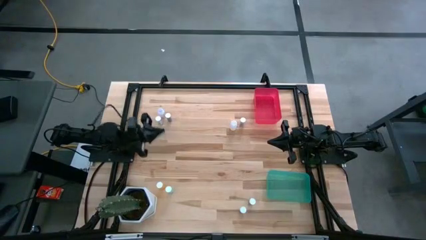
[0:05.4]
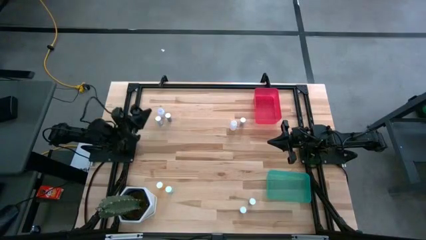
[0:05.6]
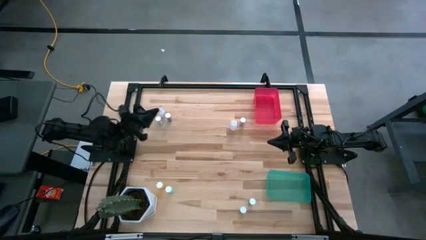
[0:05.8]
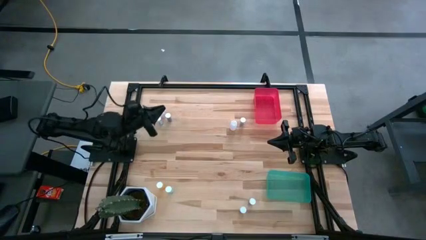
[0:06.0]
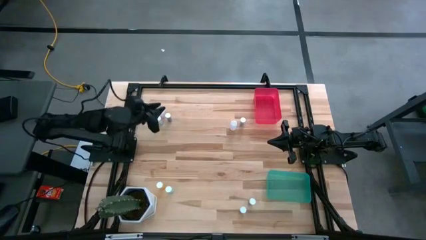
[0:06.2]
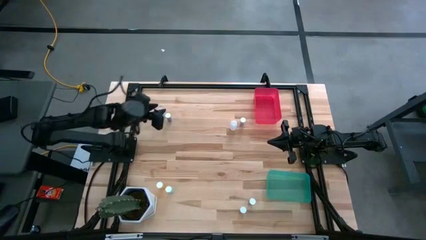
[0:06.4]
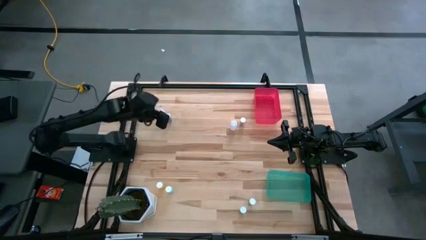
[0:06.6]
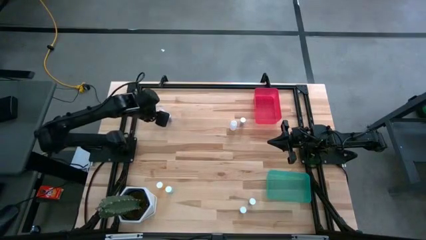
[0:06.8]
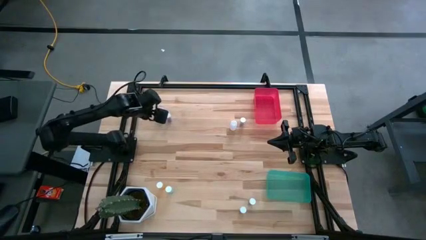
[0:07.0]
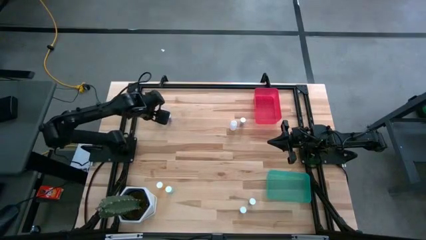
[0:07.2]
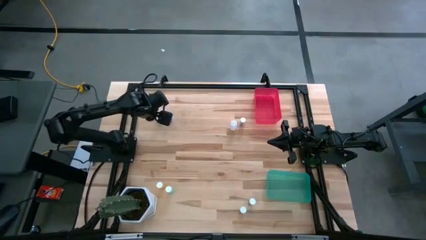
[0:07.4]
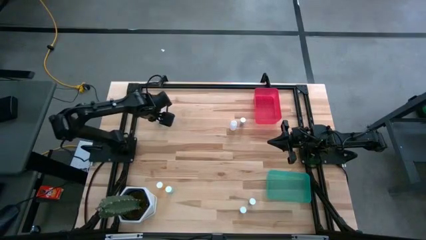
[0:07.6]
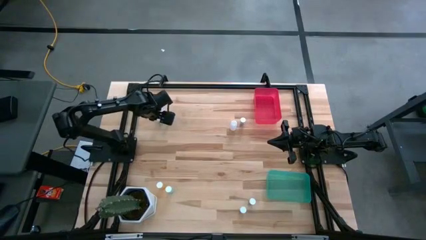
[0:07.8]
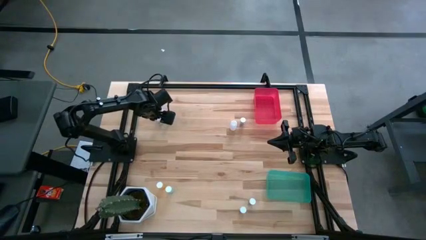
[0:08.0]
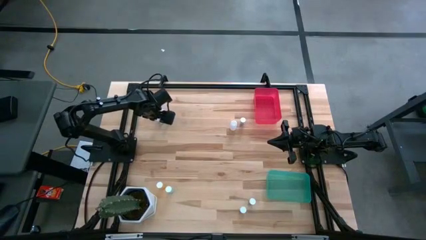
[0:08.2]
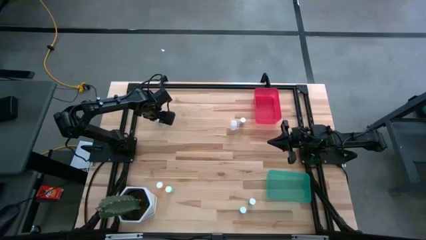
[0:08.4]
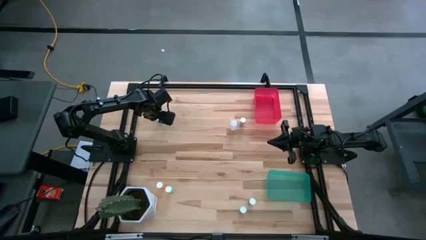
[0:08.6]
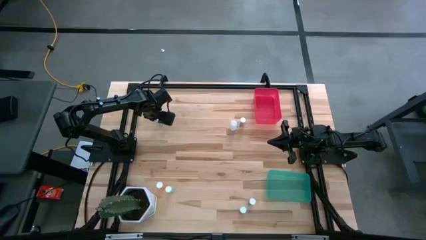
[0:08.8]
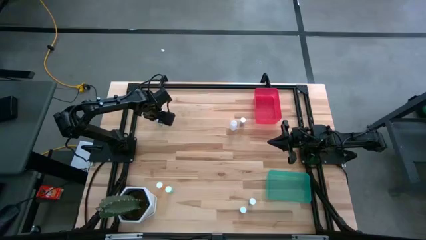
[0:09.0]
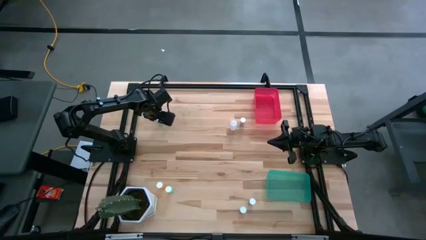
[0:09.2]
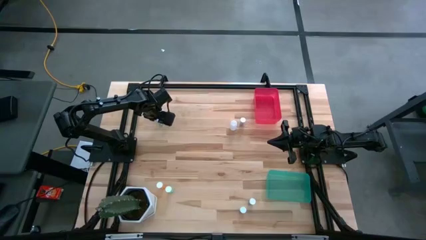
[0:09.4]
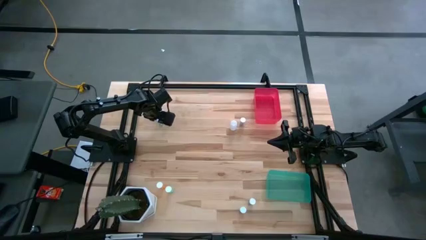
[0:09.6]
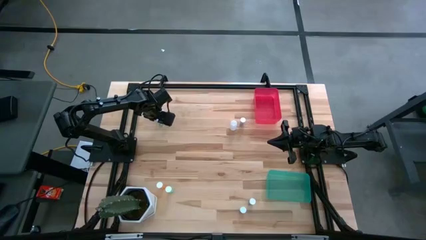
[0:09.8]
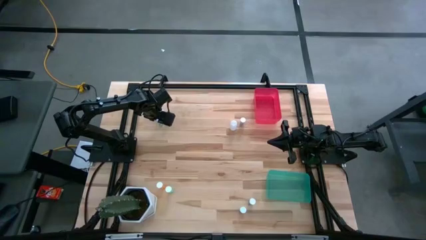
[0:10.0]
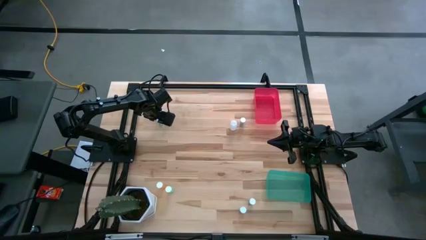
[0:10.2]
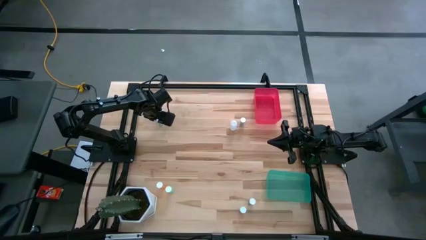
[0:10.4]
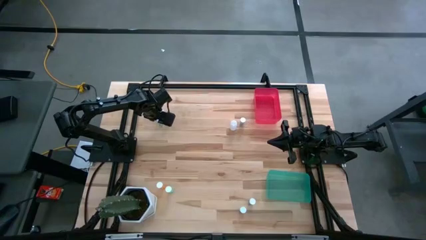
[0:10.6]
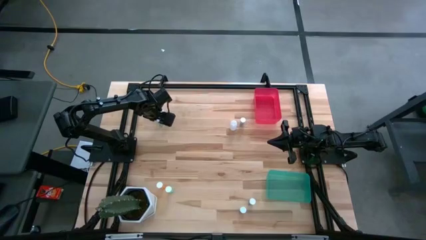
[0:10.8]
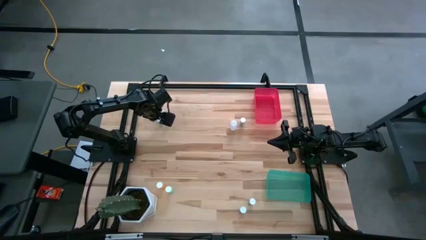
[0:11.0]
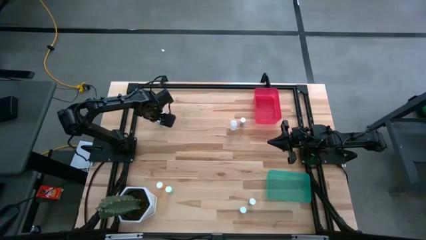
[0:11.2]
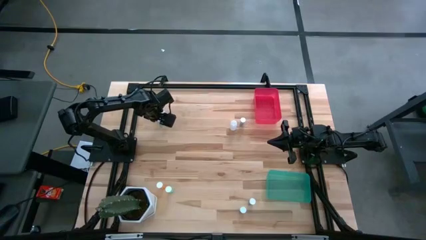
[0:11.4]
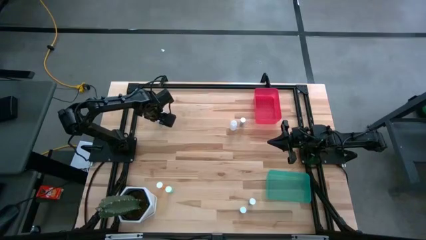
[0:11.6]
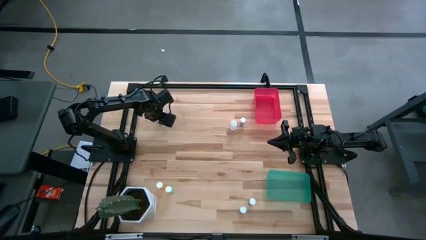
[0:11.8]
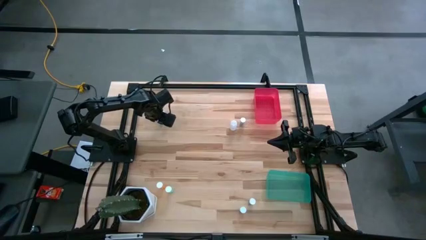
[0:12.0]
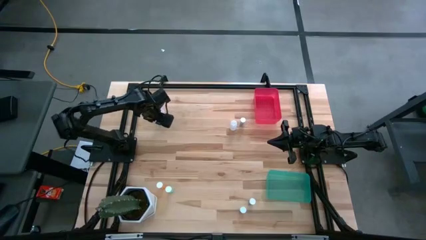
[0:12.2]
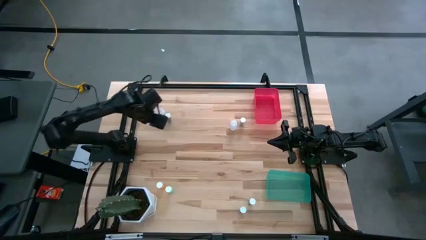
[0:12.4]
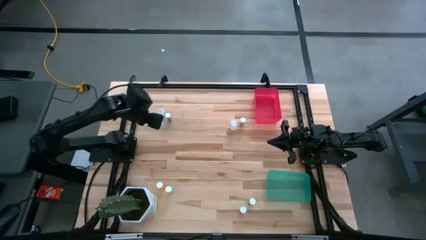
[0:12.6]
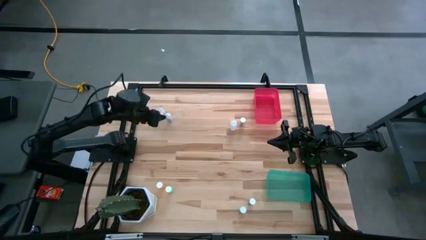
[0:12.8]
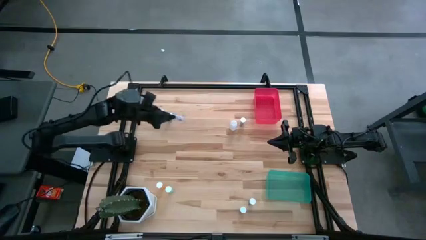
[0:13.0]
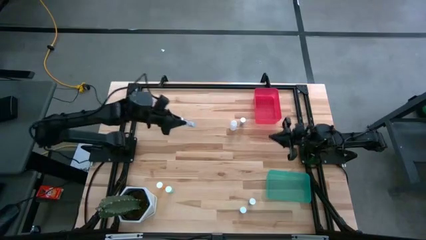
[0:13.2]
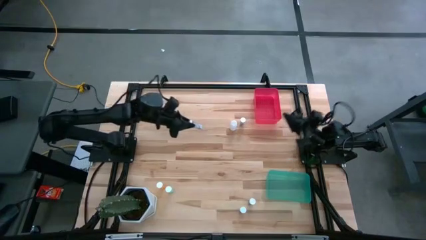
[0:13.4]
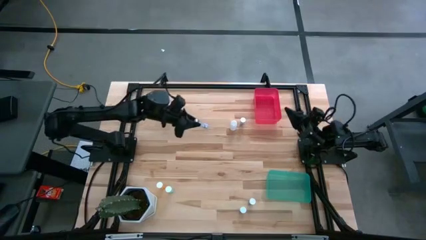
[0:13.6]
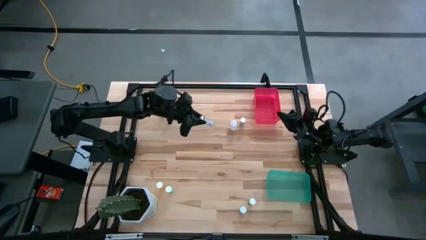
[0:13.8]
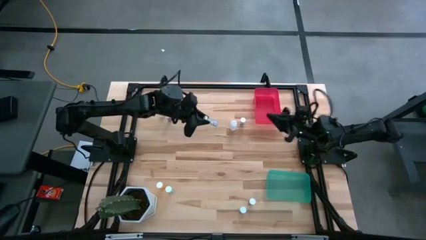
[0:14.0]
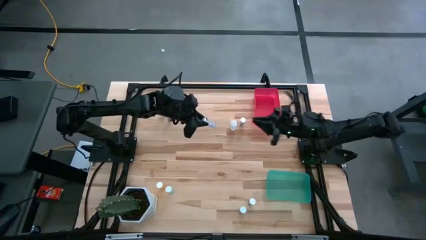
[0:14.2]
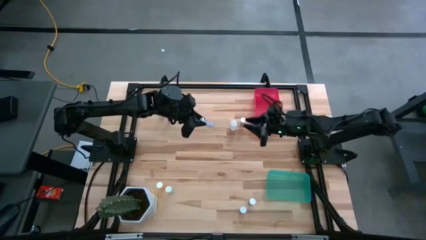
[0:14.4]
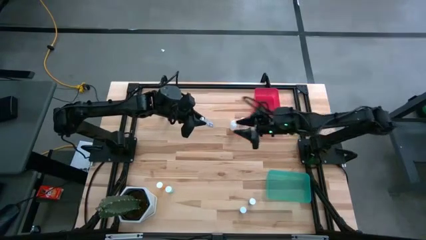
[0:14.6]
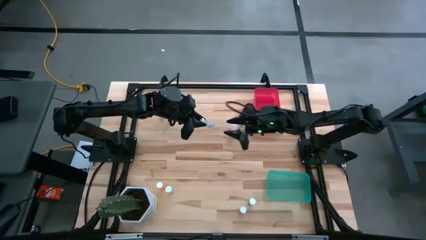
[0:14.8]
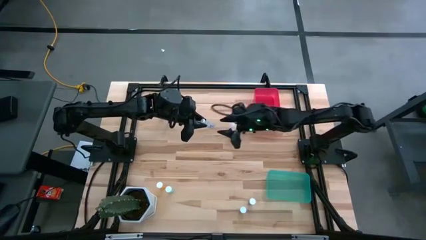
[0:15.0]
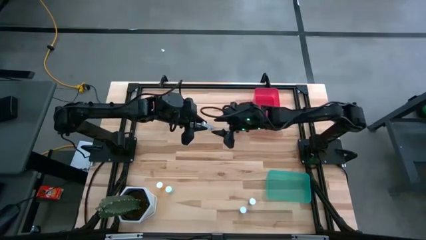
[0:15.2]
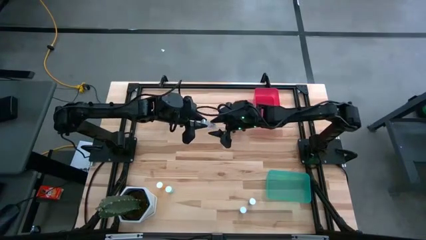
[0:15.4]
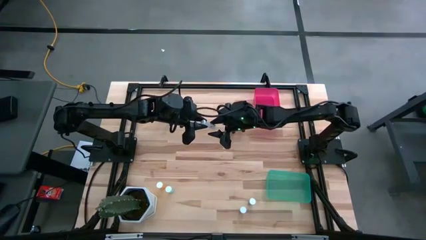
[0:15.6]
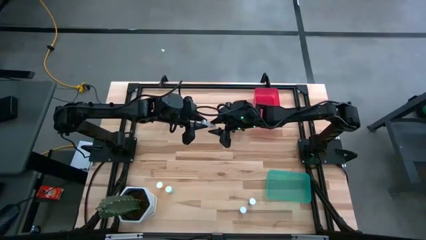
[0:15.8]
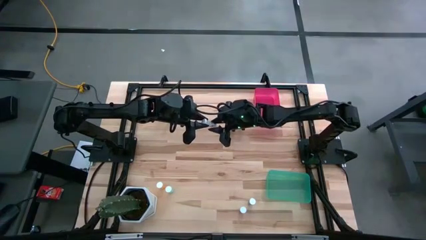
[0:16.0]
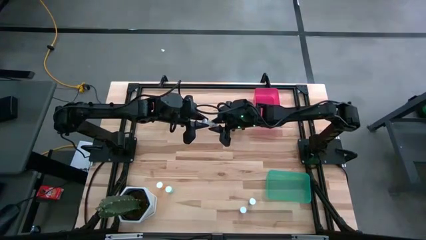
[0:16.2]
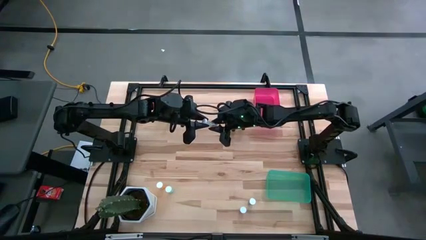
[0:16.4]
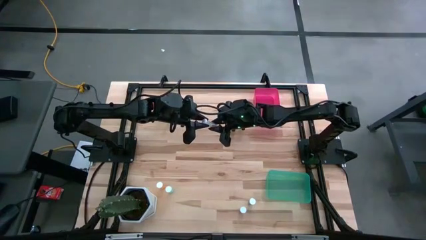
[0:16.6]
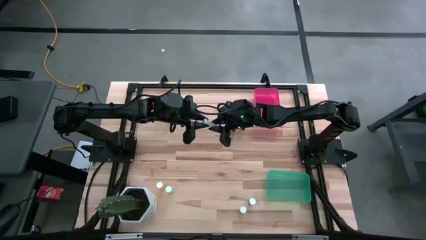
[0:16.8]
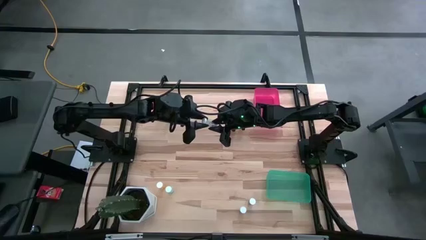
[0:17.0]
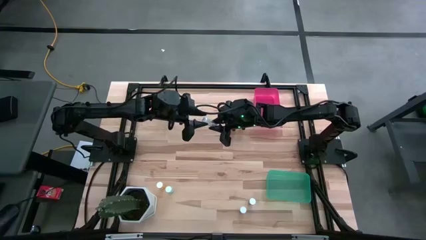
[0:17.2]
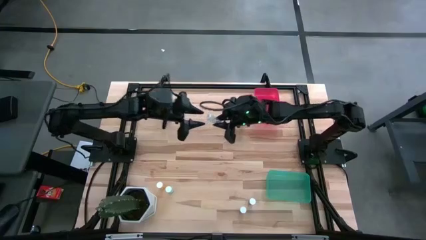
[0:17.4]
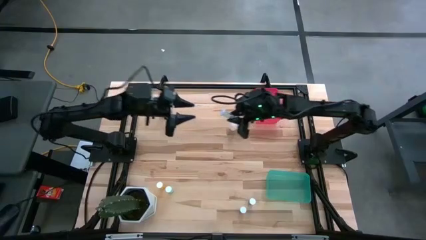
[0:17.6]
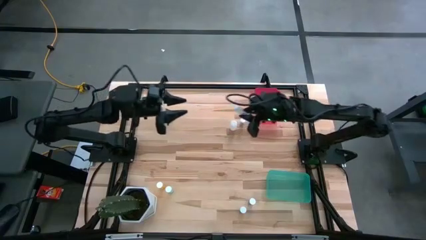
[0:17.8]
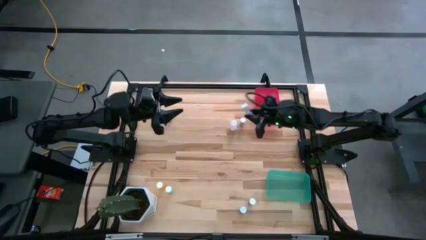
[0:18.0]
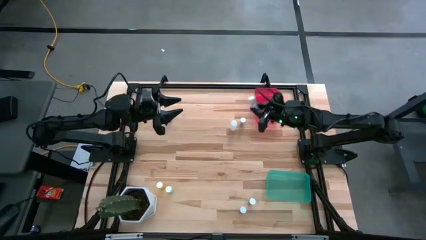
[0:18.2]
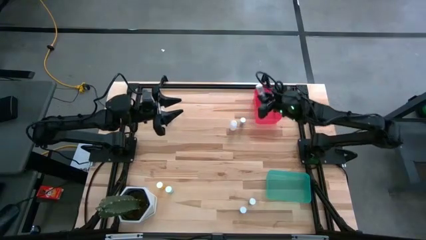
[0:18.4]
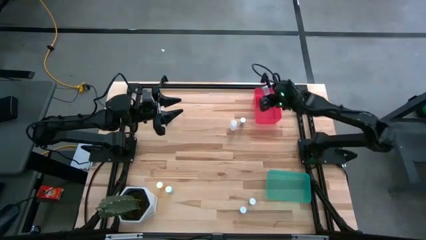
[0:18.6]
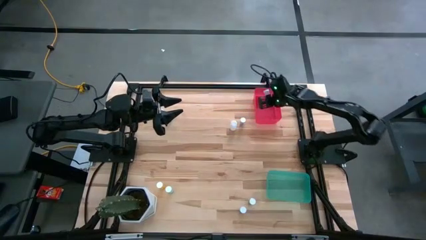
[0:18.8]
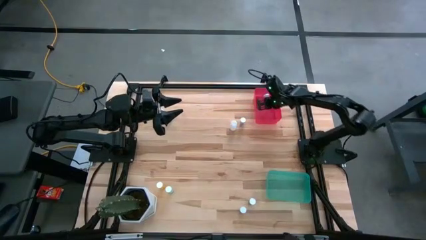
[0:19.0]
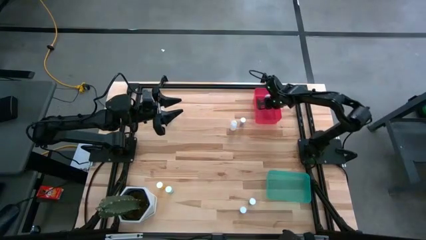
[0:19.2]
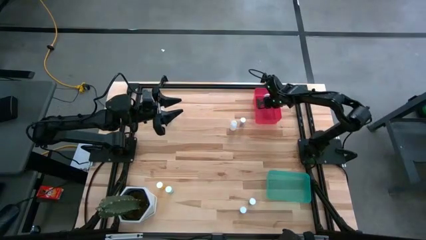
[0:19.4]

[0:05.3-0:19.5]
Task: Pick and place medicine bottles into bin by pill shape (circle, oval)
Put the blue capsule bottle into the red bin
